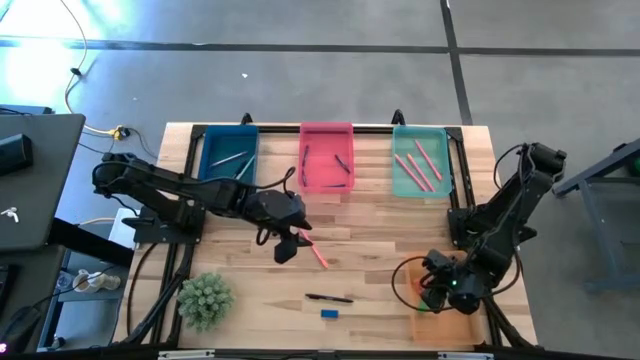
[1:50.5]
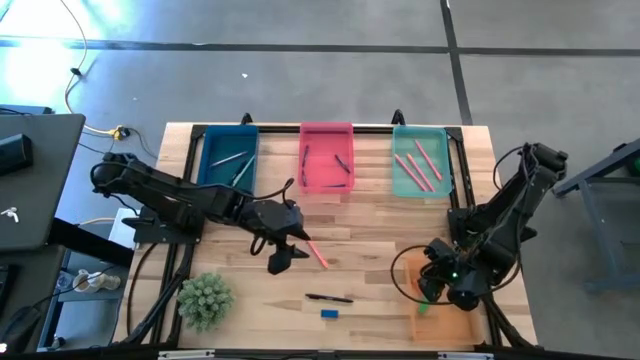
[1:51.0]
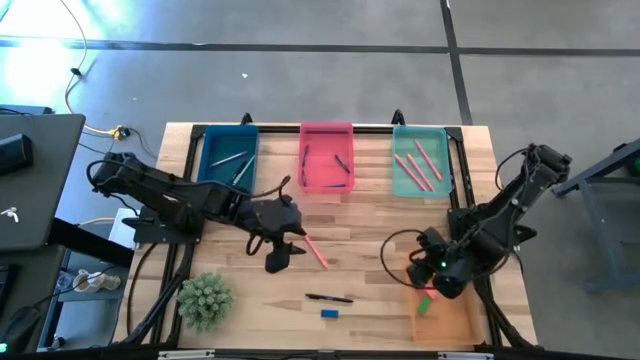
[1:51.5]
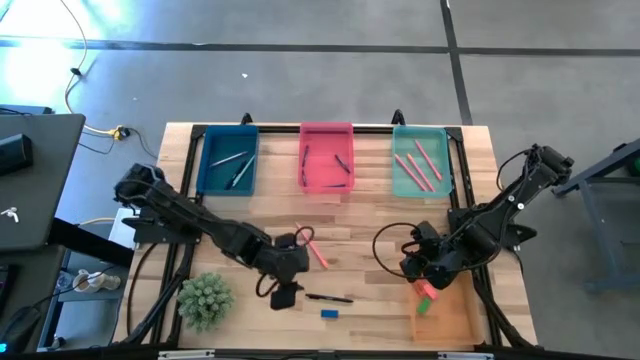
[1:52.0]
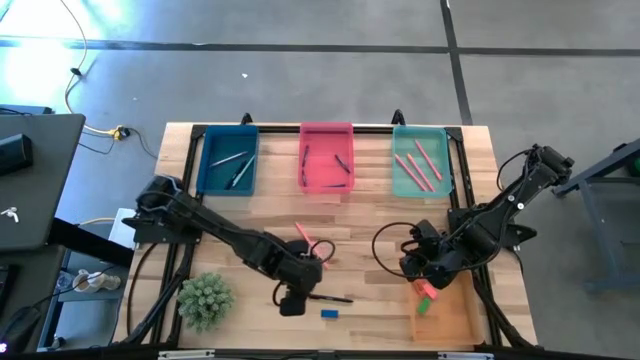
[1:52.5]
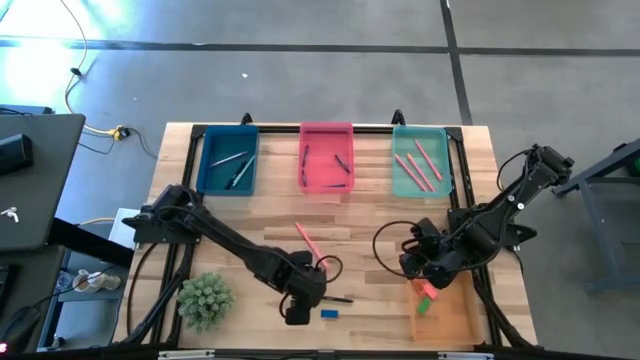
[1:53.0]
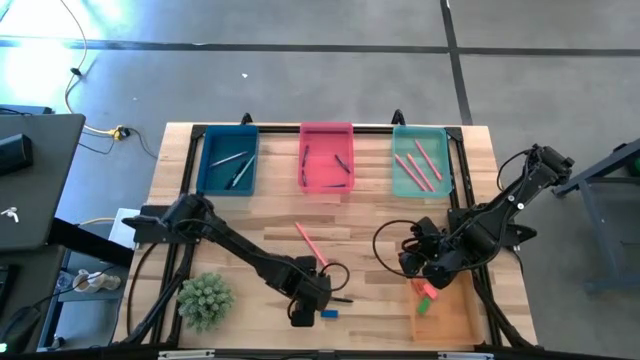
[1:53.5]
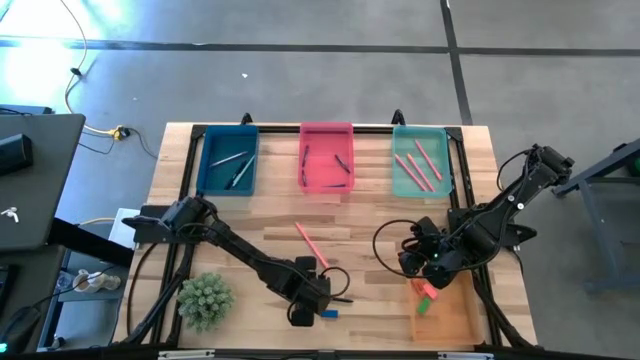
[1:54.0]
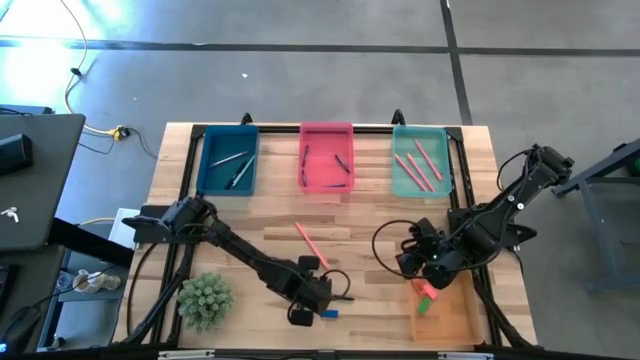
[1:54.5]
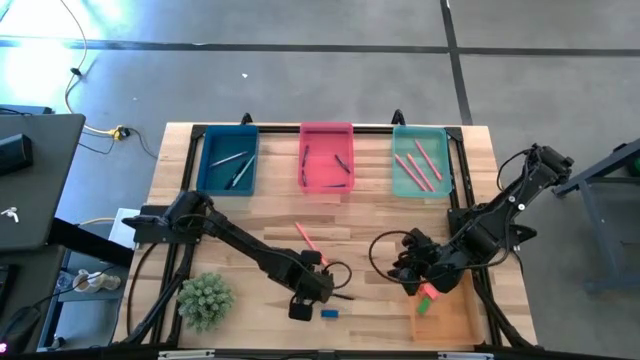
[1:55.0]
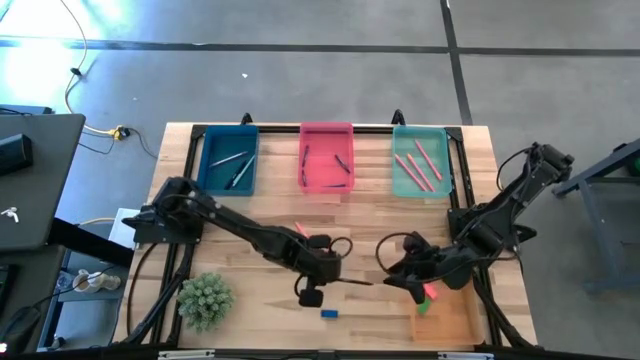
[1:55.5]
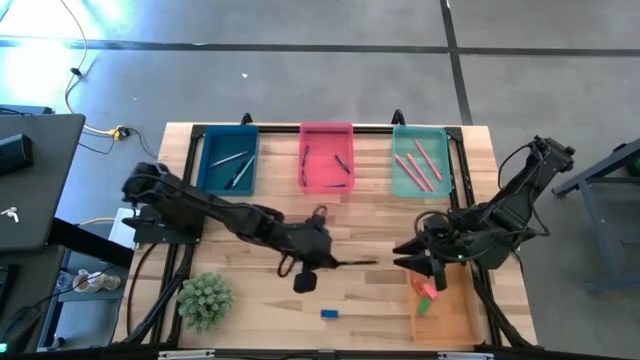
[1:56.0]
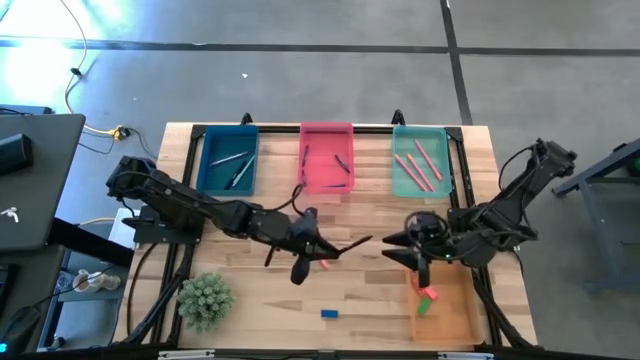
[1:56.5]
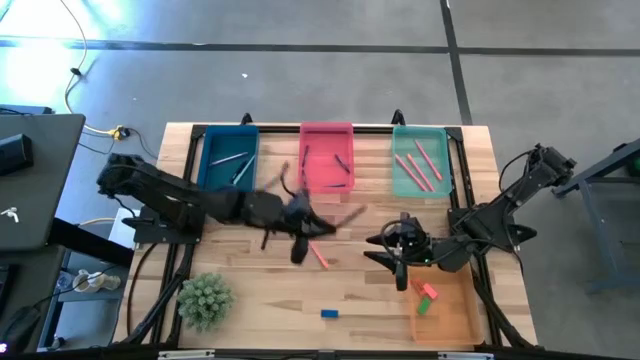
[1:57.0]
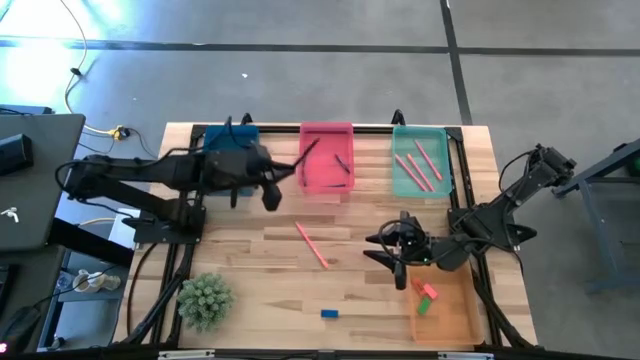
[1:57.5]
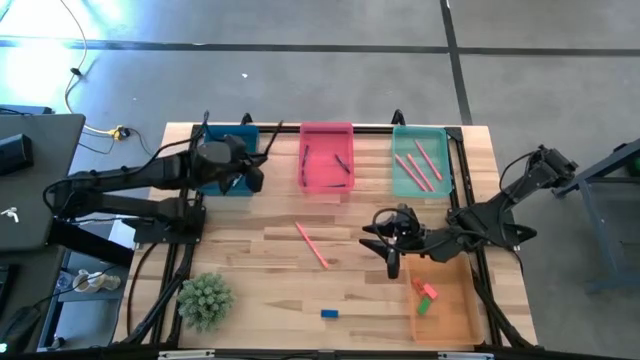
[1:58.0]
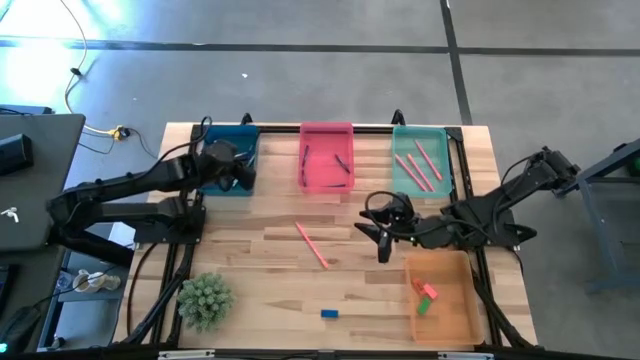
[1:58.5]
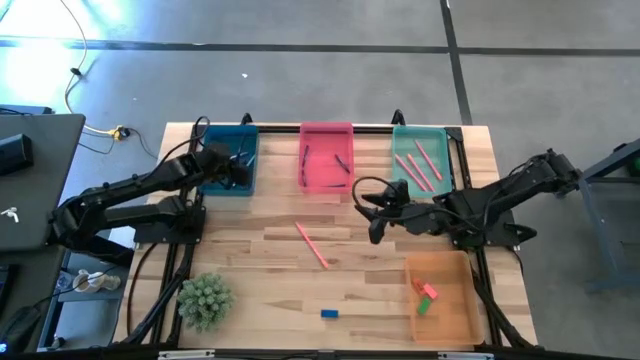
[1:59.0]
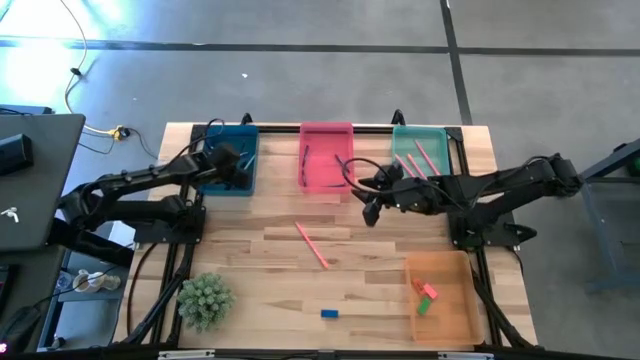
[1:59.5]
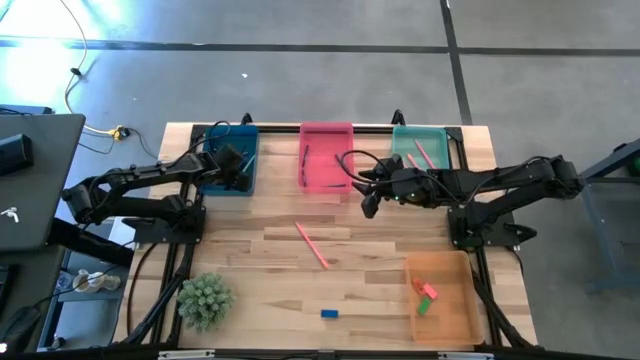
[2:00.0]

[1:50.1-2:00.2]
Task: Sort crayons/erasers/pens/pencils in bins
Put the black pen into the blue bin

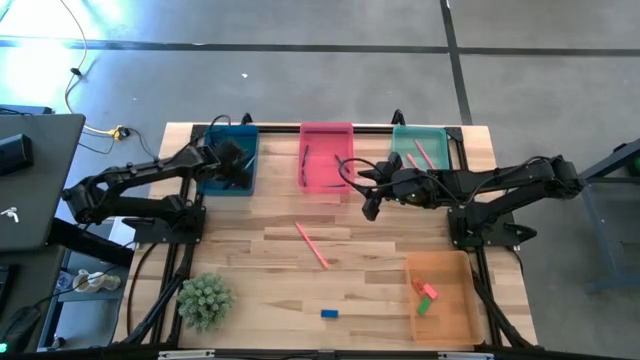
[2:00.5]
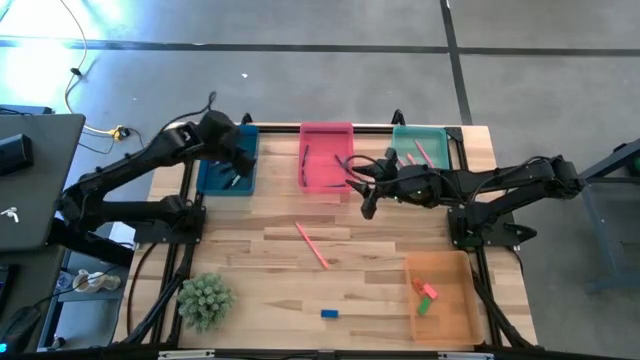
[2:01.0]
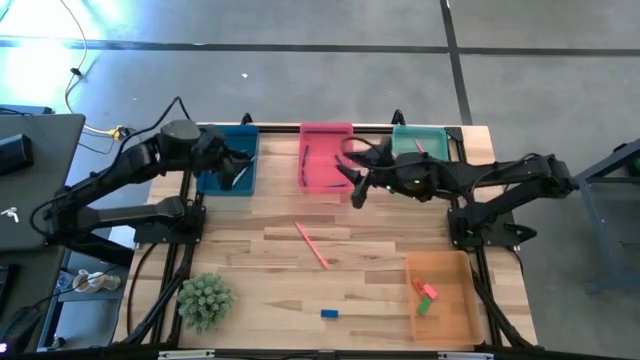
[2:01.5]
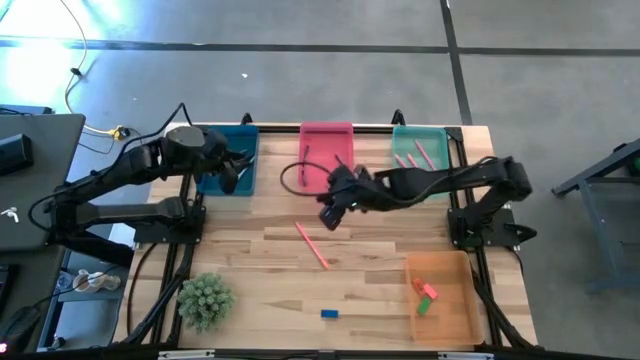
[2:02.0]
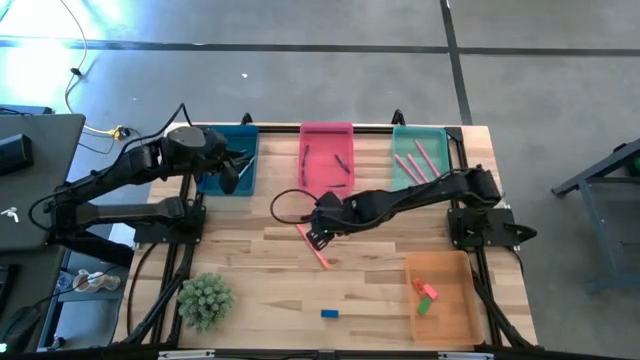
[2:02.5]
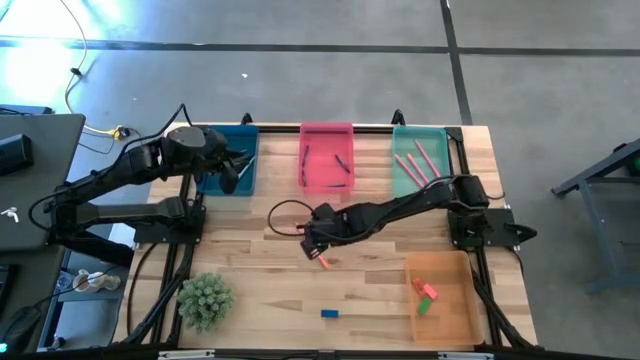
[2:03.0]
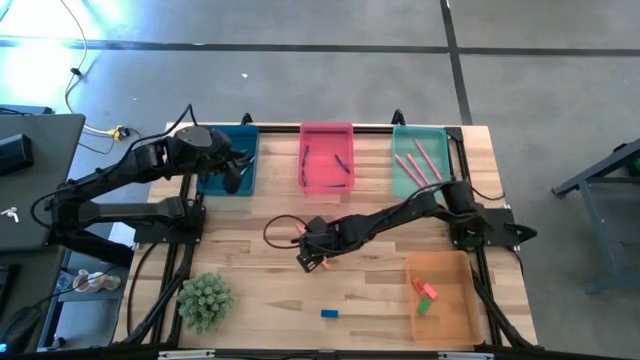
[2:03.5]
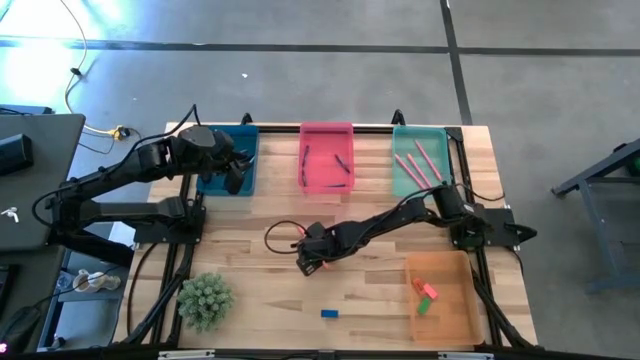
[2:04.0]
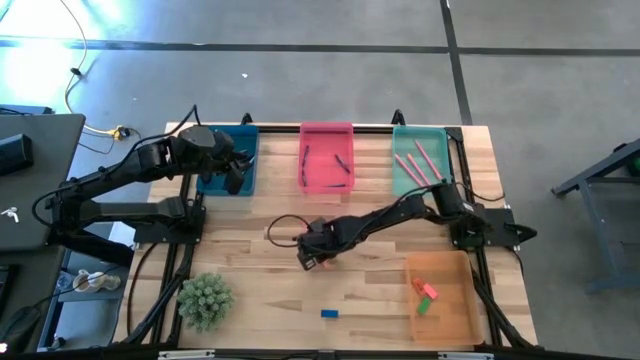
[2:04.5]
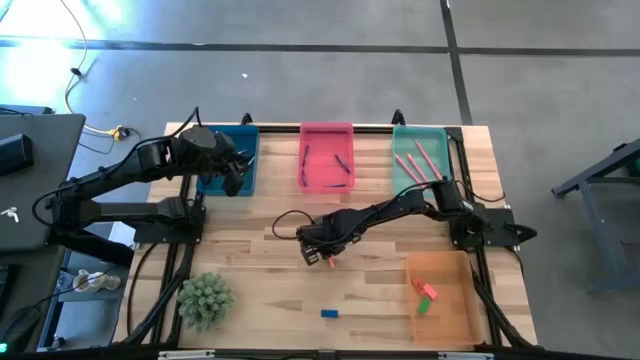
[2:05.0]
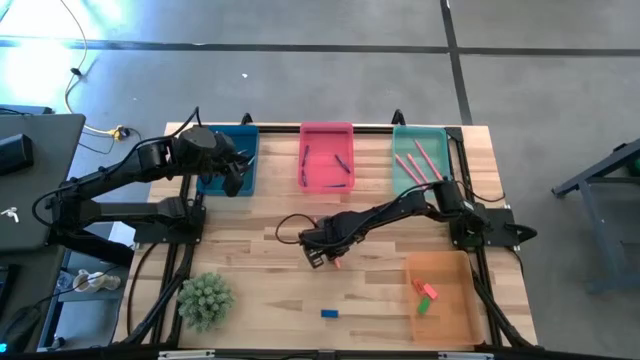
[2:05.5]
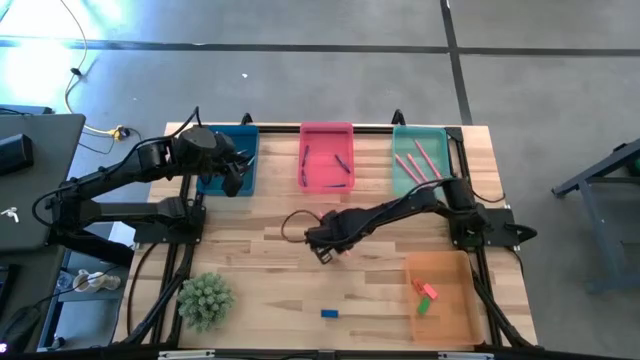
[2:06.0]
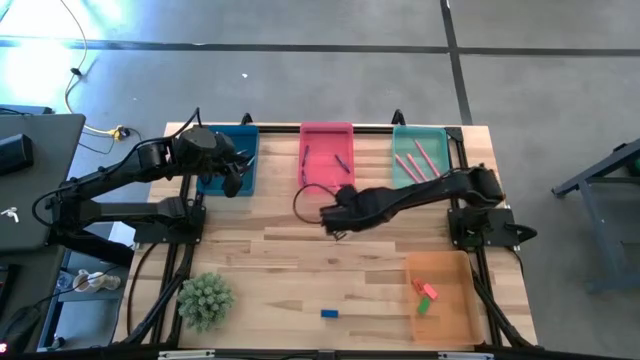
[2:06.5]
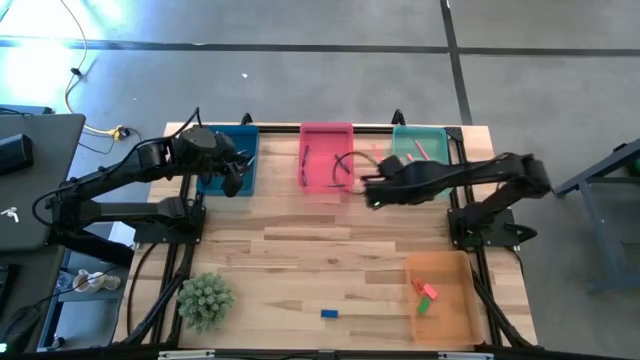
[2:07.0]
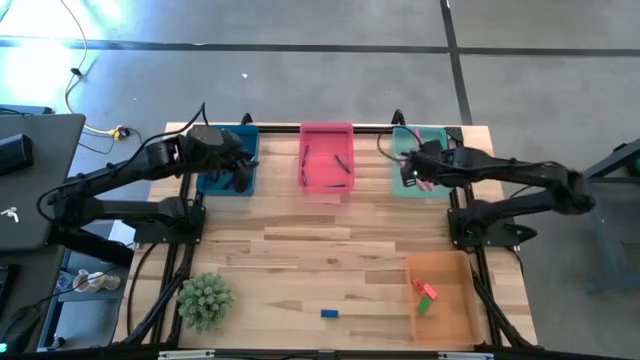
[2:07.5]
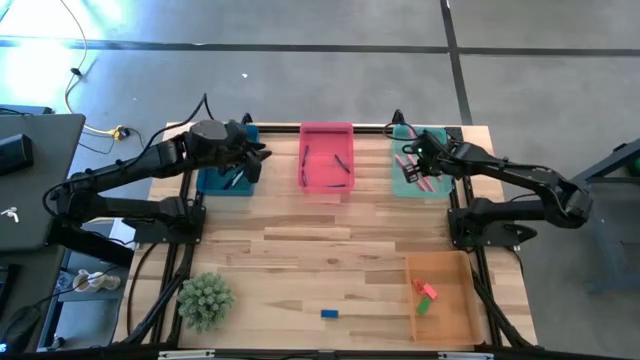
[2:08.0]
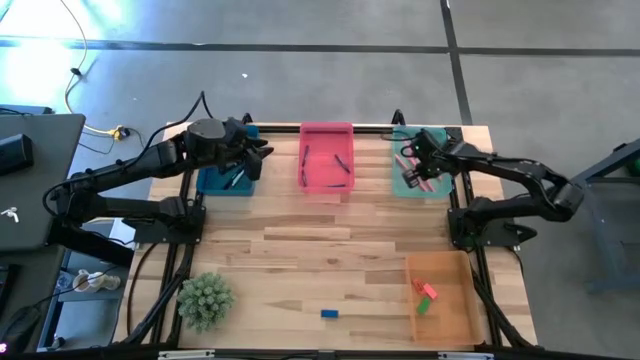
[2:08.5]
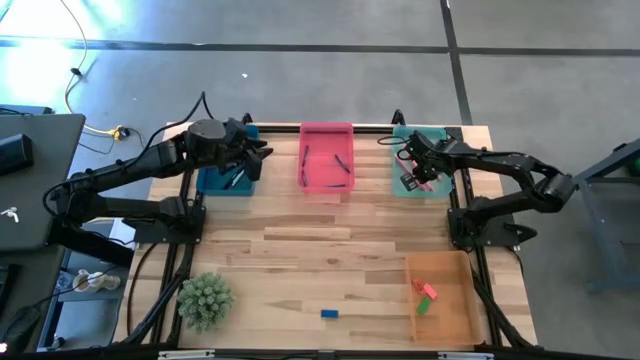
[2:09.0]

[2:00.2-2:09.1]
Put the pink pencil into the green bin

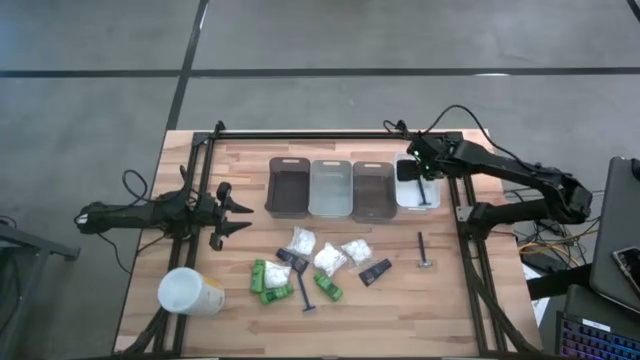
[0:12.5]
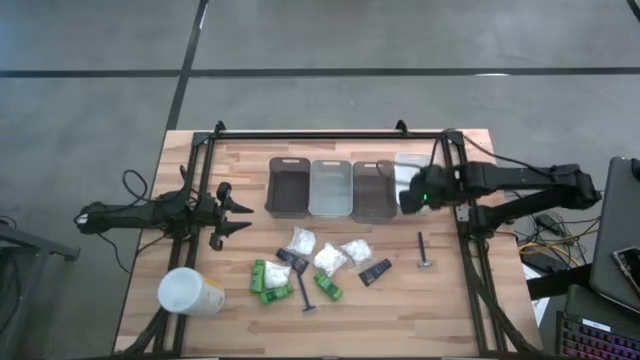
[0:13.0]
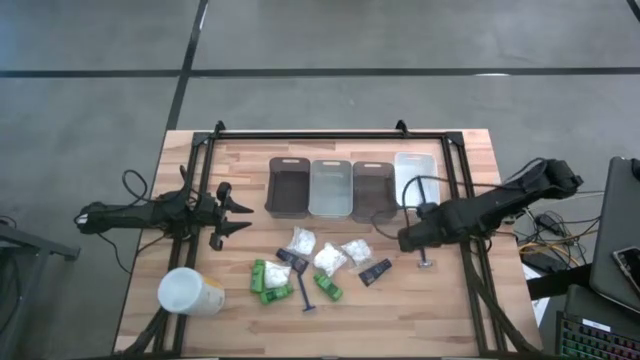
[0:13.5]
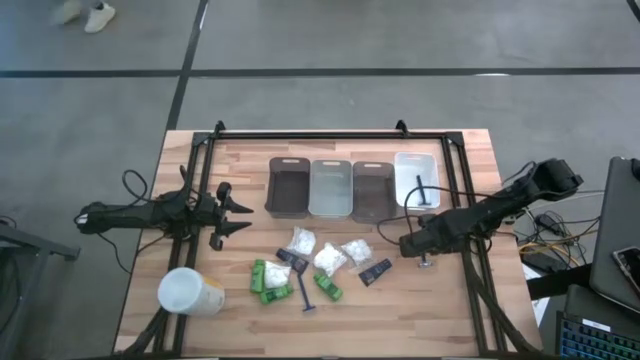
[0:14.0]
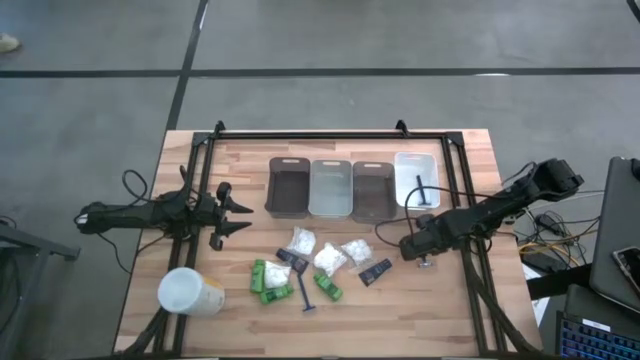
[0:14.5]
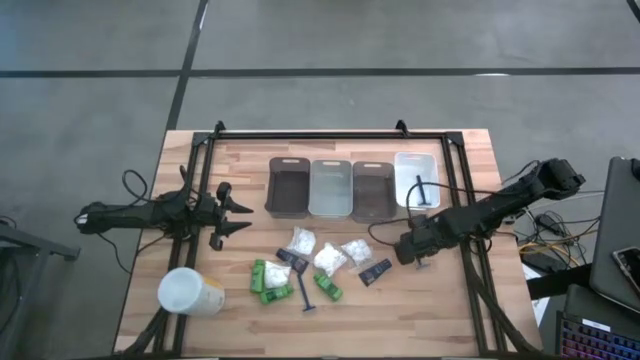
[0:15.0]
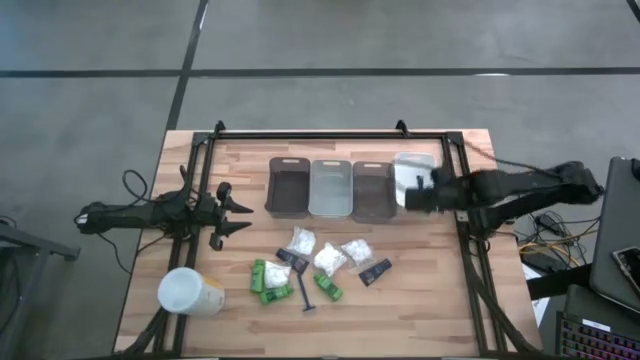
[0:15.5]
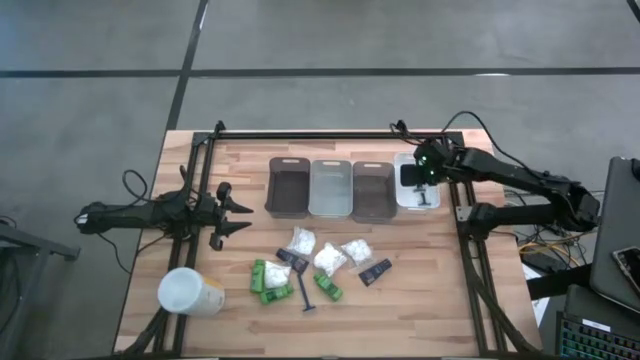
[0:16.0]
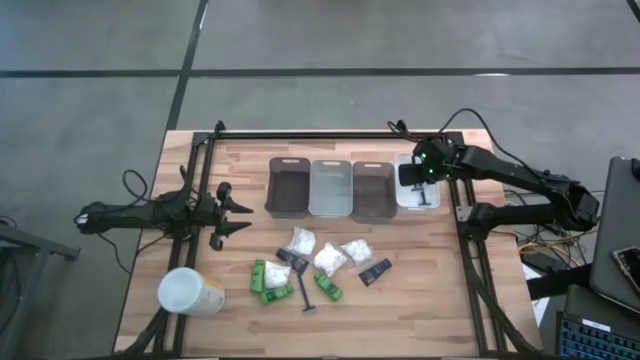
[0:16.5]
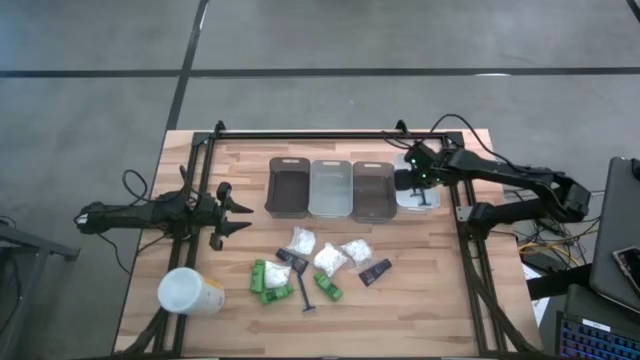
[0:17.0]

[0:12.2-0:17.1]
Task: Pick & Place Travel size toiletries
Put the right blue razor into the white bin
